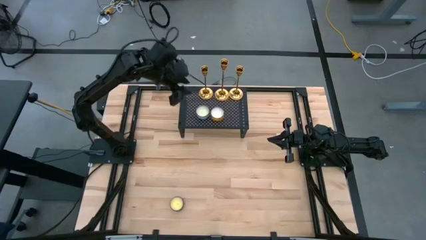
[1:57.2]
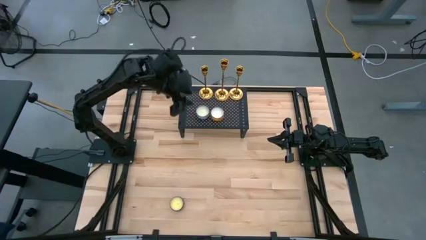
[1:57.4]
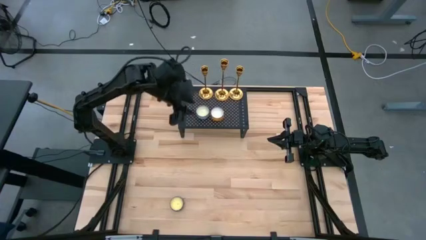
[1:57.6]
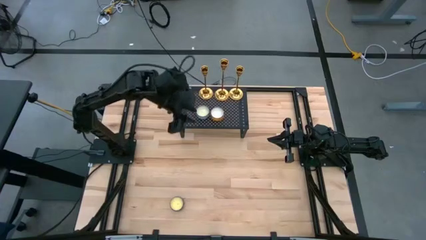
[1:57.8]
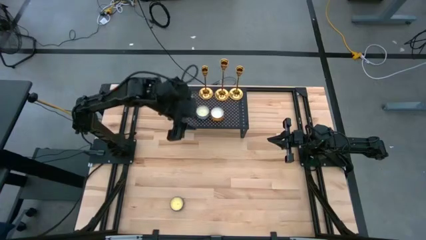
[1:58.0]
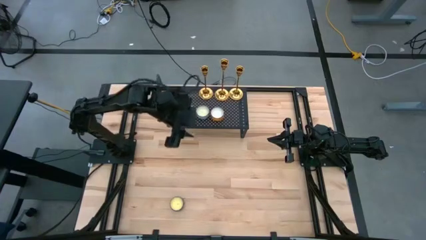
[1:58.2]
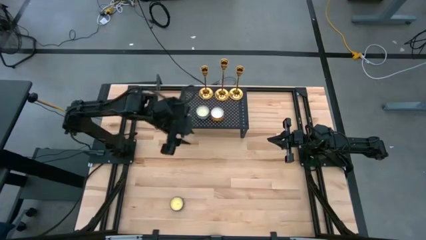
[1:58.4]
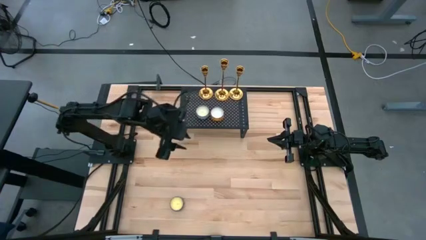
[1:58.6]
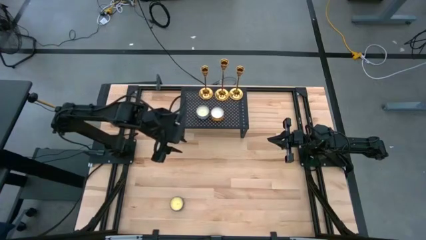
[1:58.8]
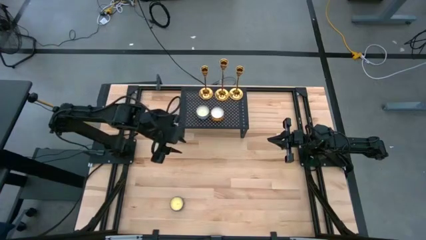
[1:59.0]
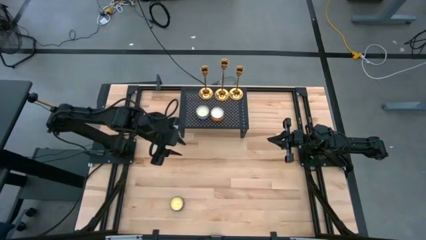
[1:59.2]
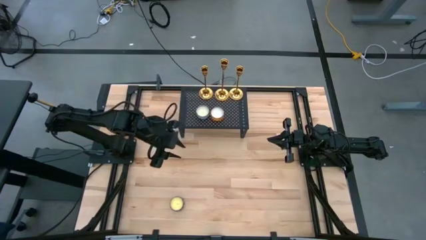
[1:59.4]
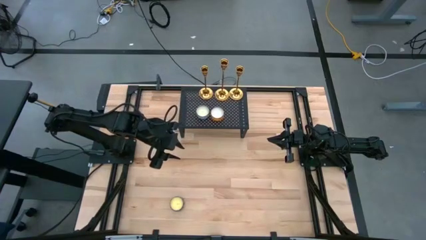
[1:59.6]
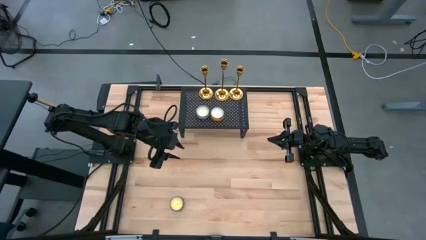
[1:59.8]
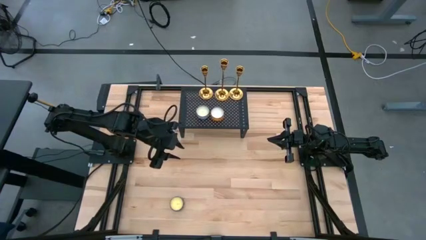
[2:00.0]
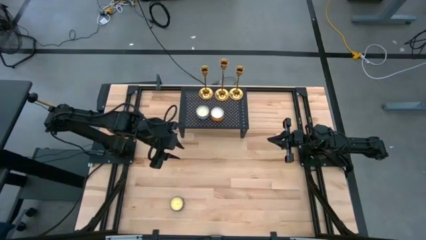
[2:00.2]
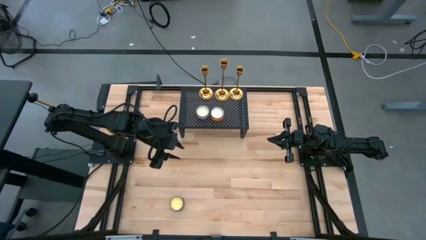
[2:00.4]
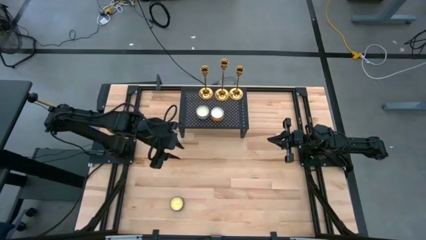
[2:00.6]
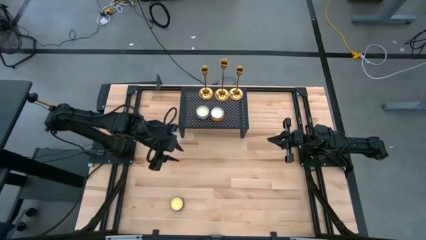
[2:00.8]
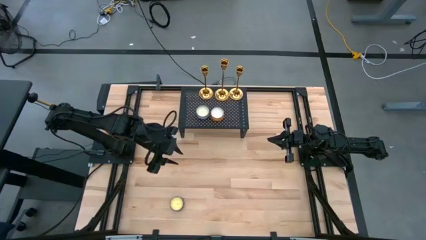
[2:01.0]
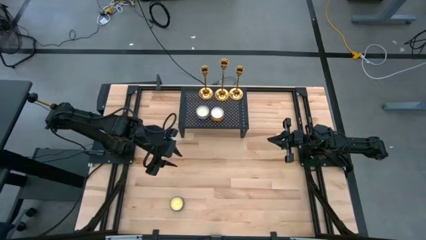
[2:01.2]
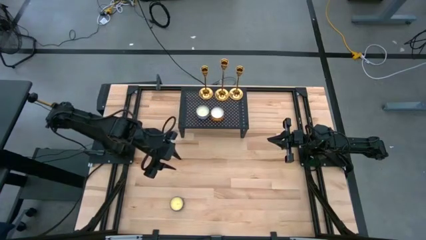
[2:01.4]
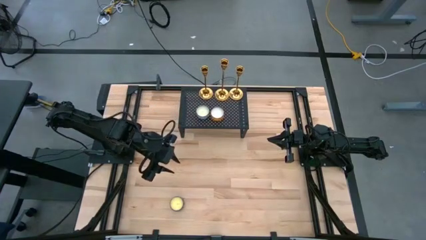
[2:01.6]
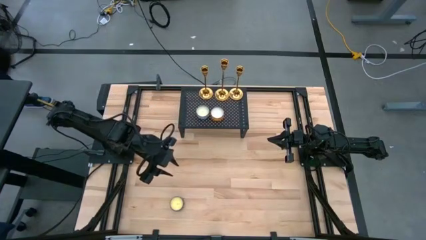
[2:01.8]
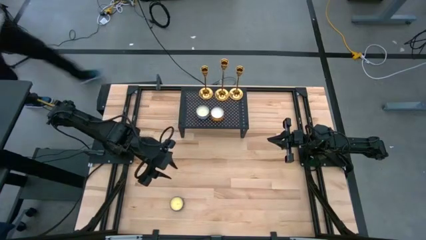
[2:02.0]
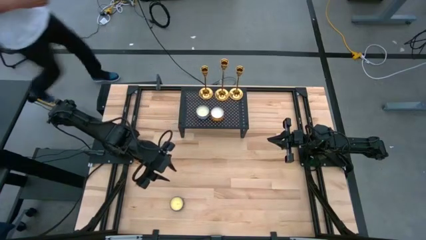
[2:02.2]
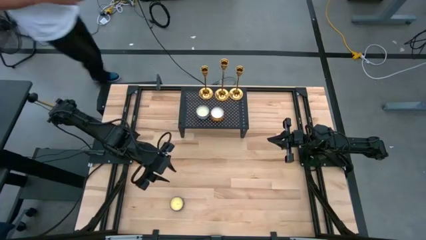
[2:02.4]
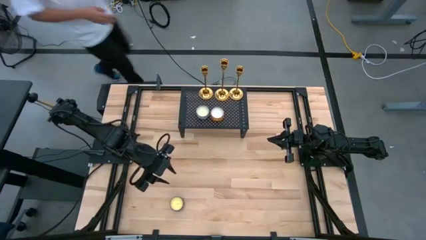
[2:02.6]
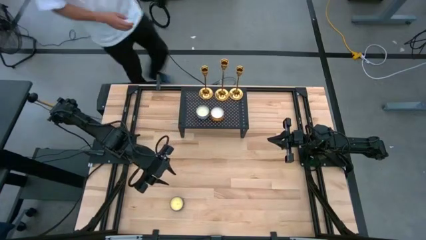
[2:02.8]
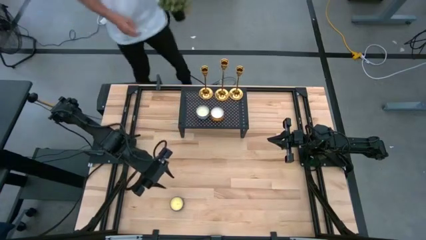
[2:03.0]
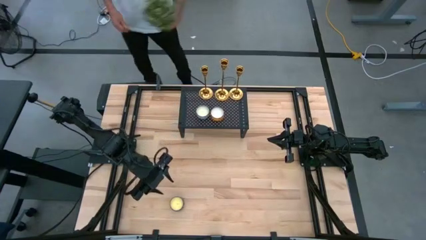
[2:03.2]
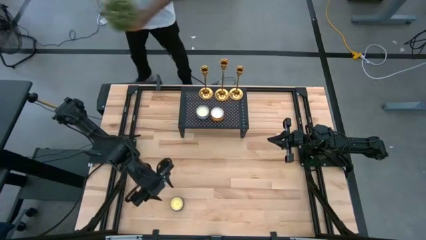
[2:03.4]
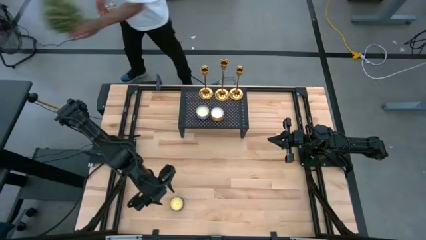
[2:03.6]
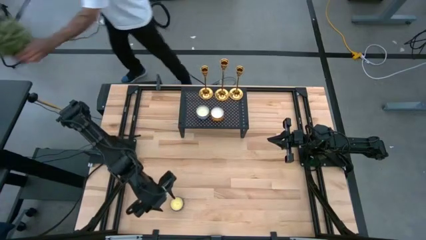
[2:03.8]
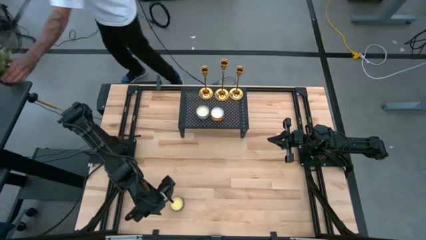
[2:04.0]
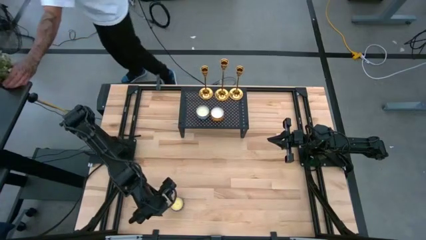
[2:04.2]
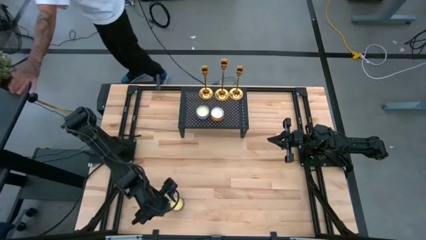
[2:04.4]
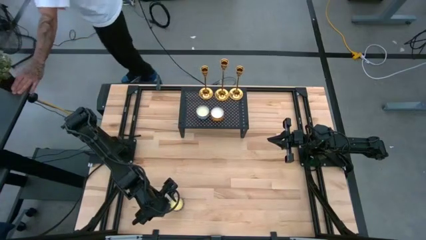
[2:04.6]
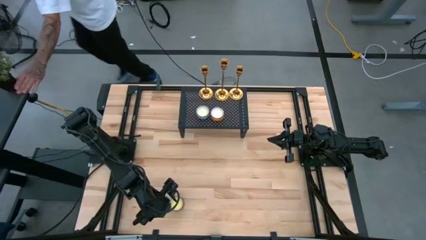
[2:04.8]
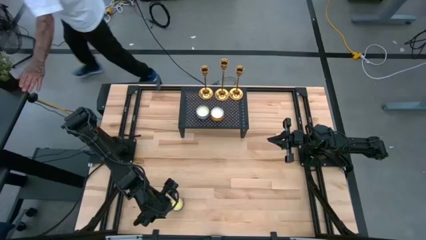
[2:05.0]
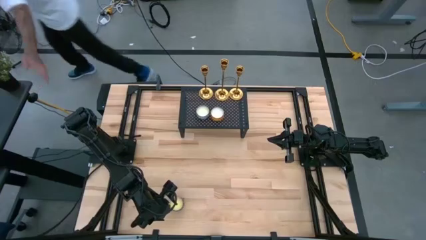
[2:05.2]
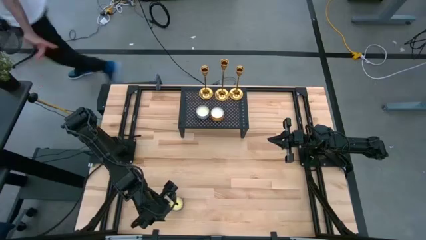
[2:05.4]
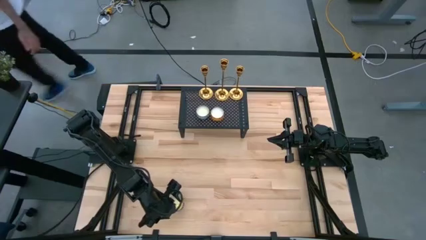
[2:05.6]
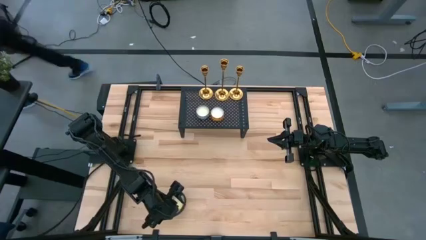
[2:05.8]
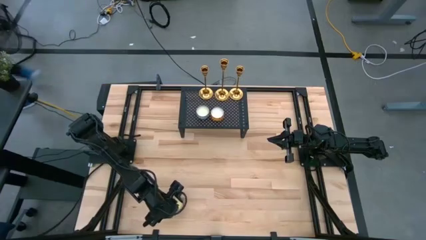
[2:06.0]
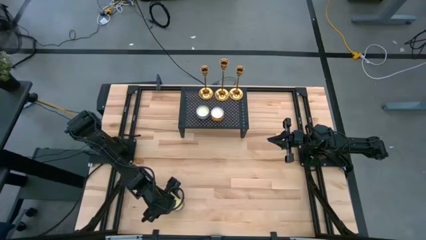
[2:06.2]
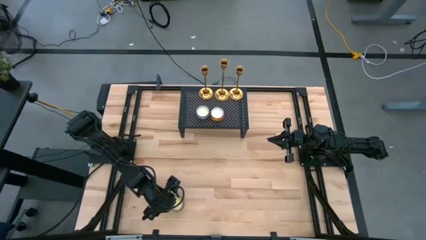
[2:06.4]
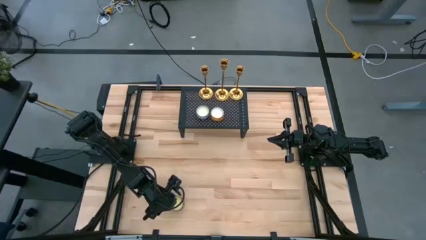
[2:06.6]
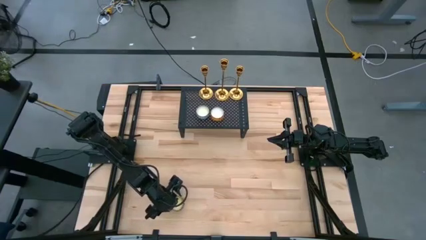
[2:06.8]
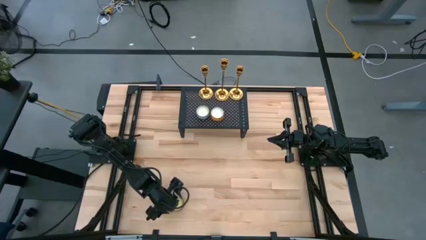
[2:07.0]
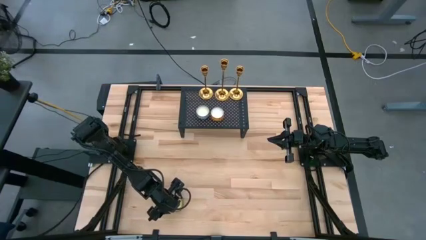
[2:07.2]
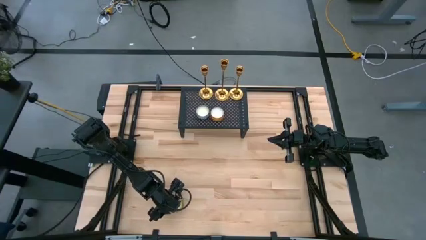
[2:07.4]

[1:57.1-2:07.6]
Task: Pick & Place candle stick holders
Put the red scented candle on the shelf

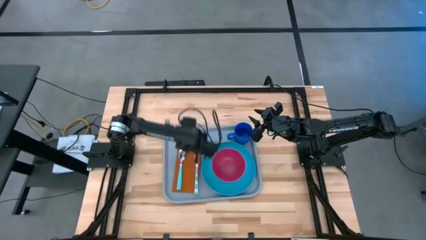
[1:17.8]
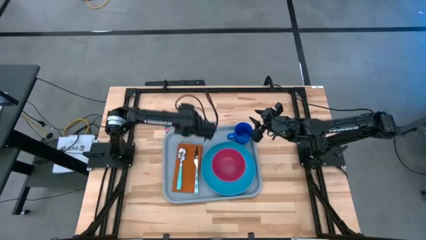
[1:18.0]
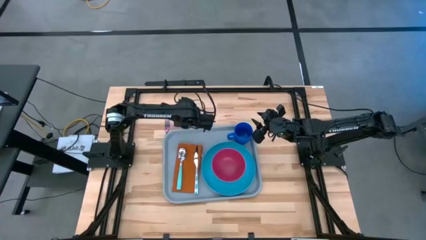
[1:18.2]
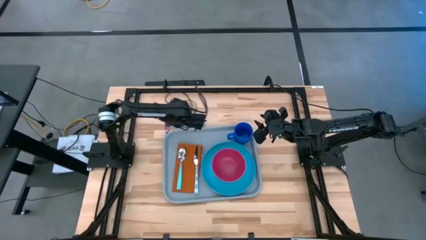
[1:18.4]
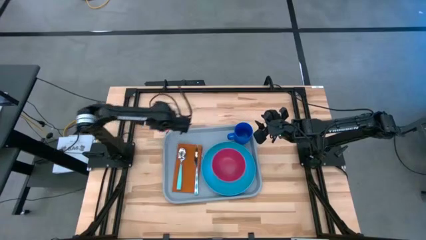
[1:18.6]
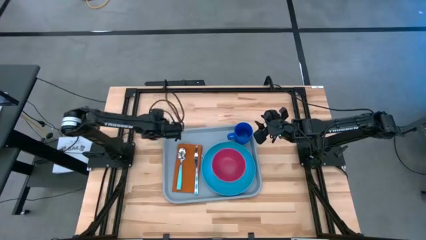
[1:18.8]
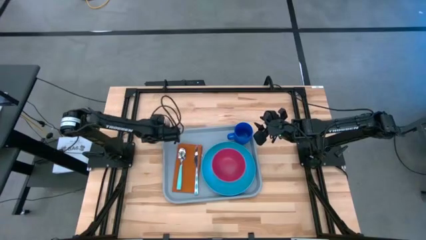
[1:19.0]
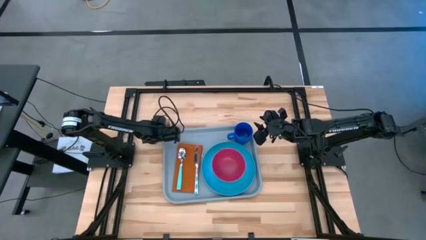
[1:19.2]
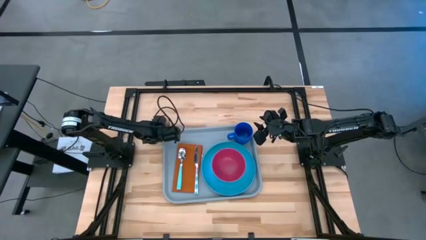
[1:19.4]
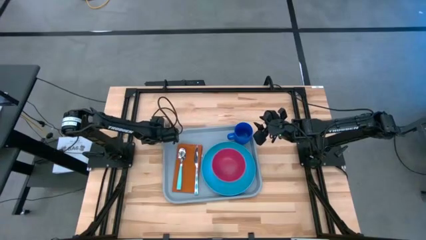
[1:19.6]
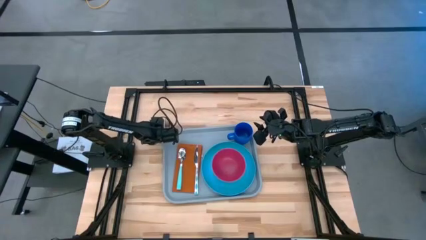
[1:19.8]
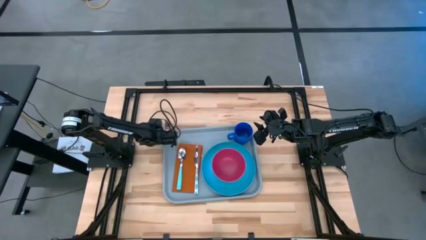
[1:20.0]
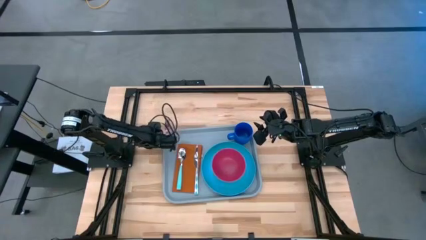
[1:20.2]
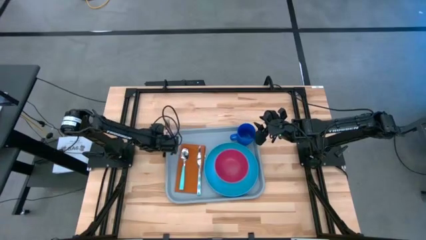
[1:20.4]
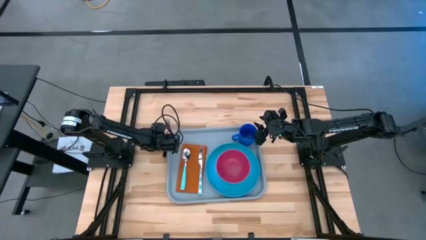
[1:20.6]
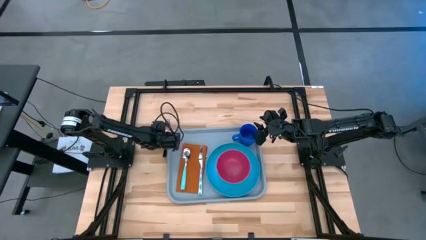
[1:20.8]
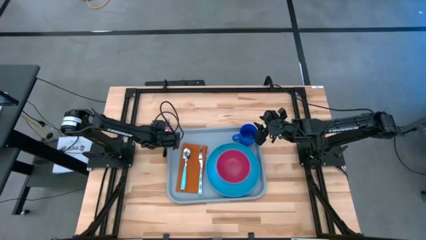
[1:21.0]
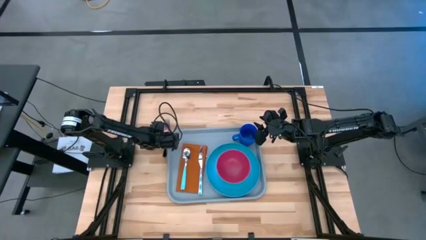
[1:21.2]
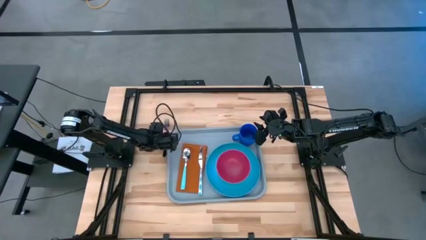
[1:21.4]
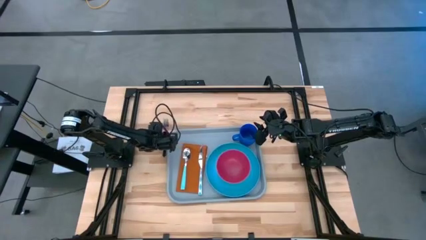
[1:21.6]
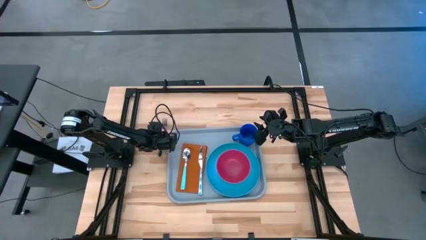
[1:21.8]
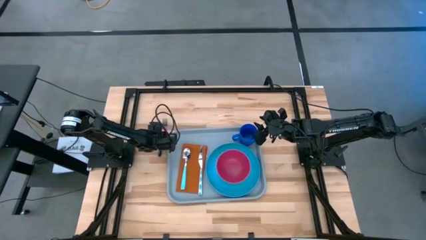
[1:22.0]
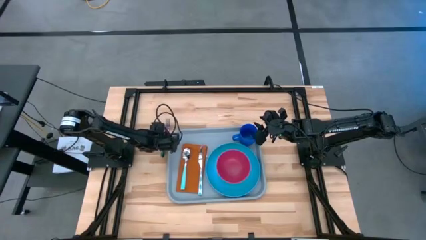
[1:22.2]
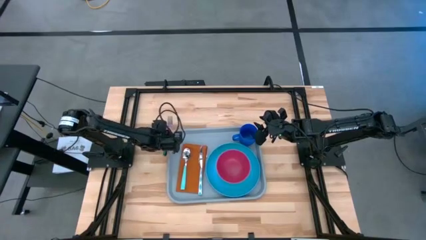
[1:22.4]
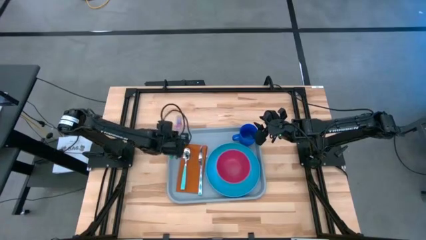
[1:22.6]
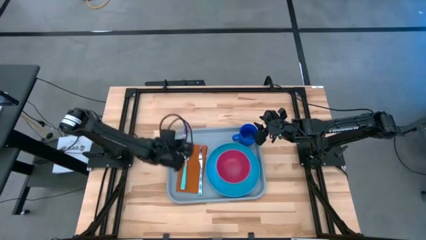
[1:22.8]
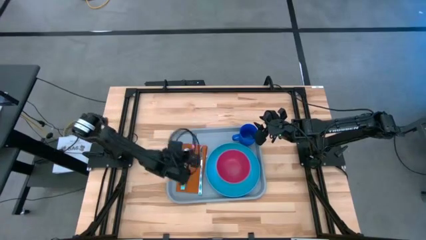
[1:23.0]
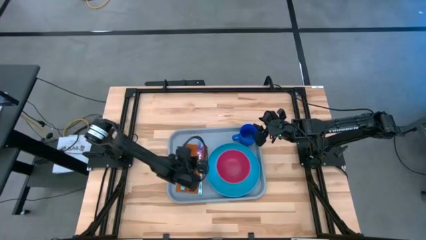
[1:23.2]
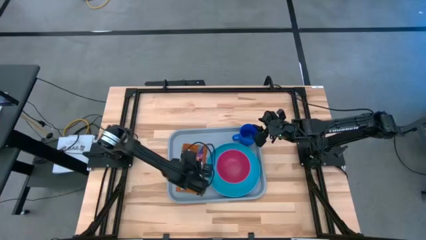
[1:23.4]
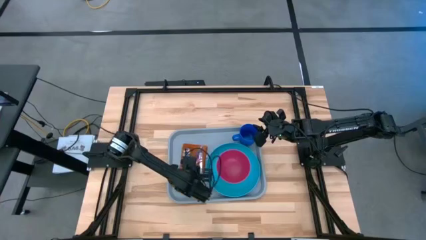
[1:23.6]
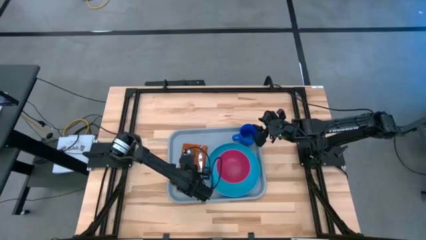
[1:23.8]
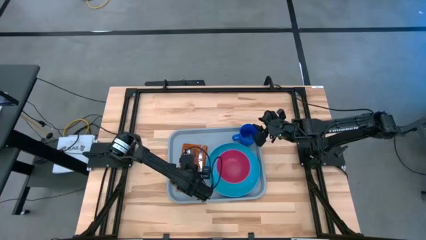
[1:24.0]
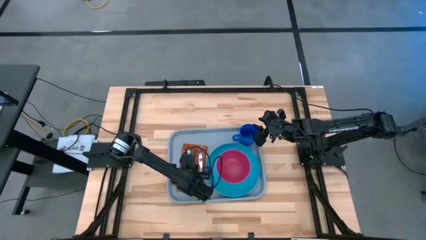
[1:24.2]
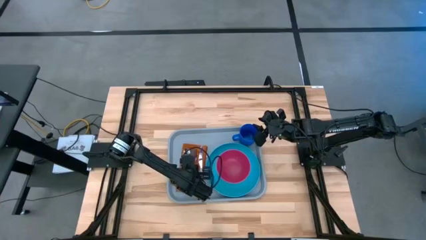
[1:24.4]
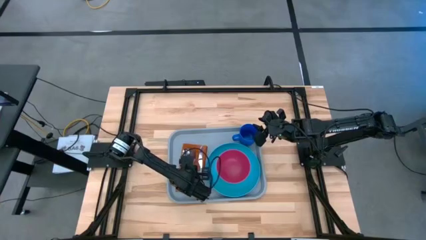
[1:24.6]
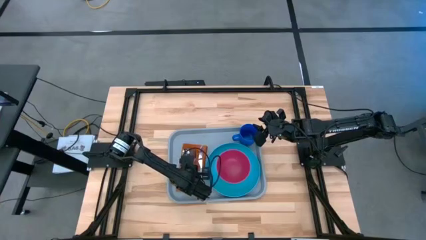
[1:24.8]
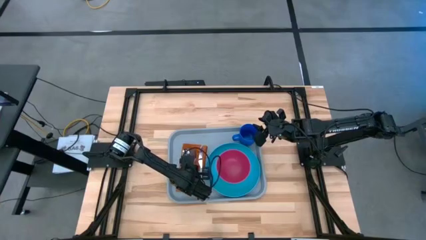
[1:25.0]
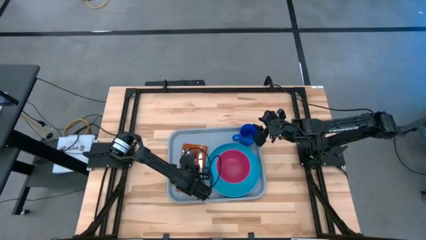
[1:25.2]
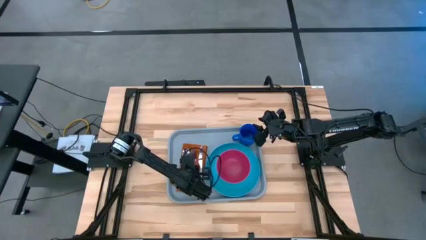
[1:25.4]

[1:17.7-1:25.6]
Task: Set up tray
Put the green fork between the green spoon and green table knife on top of the orange table napkin
